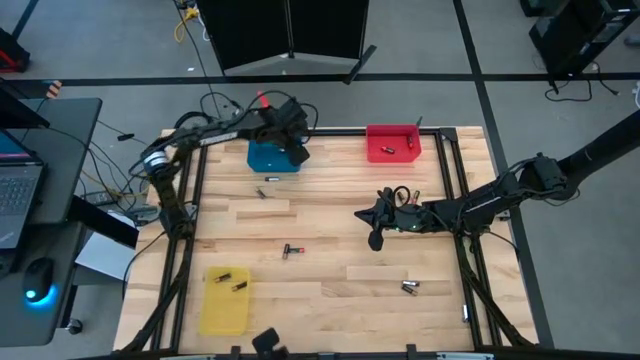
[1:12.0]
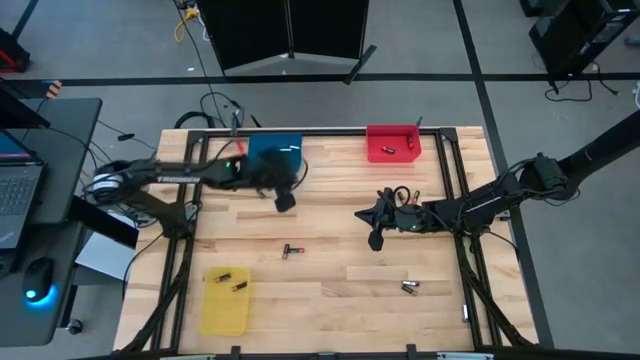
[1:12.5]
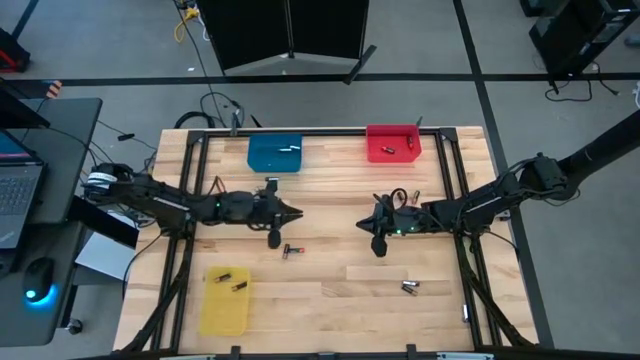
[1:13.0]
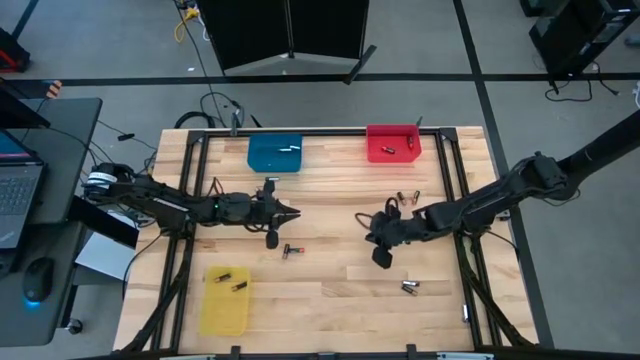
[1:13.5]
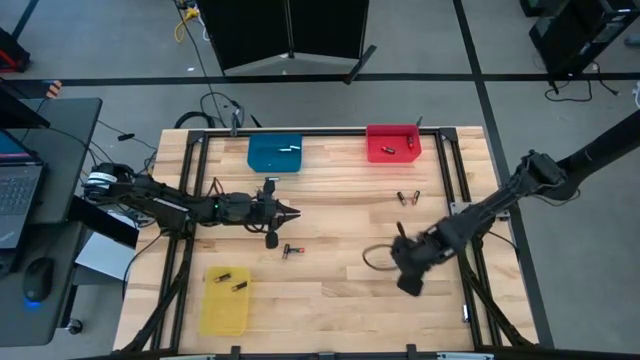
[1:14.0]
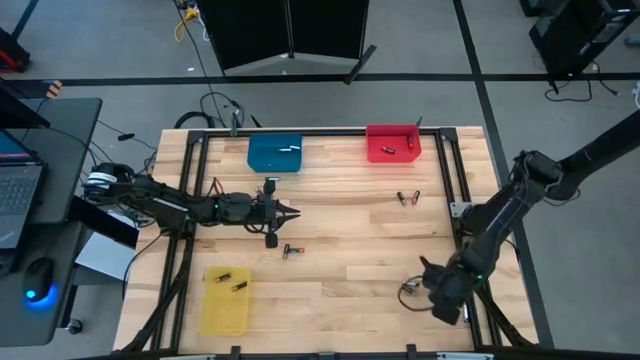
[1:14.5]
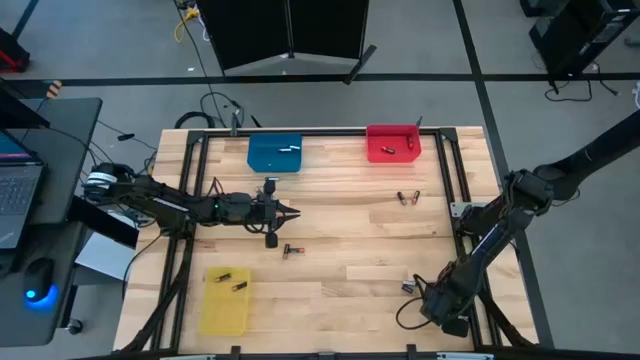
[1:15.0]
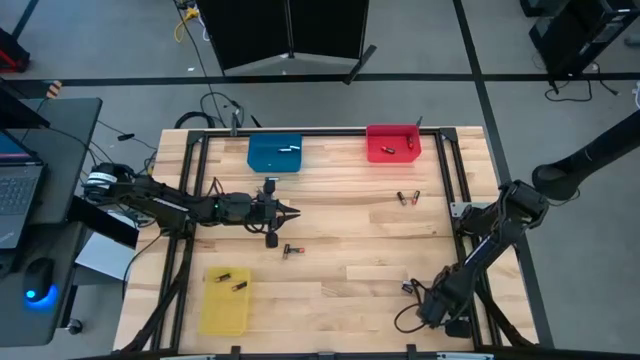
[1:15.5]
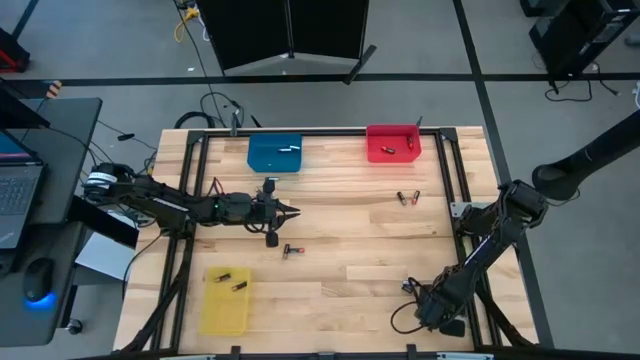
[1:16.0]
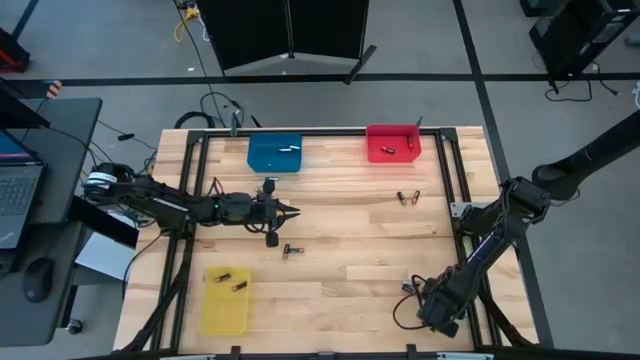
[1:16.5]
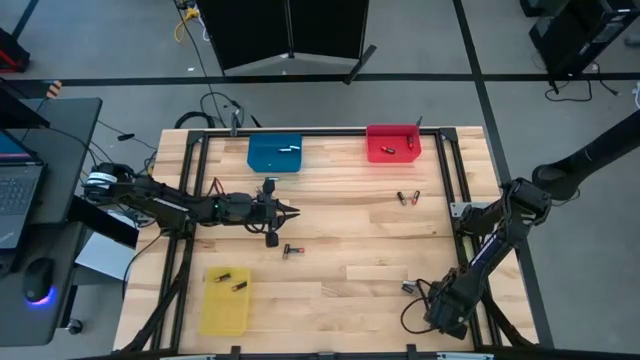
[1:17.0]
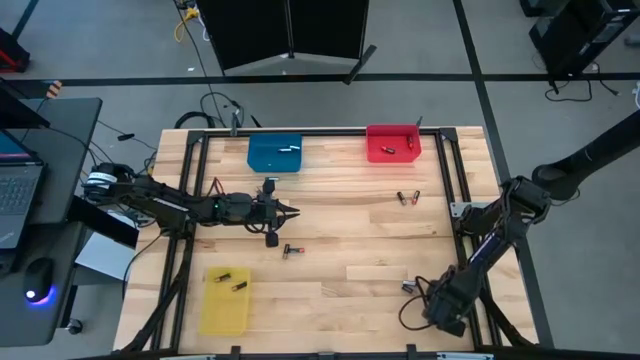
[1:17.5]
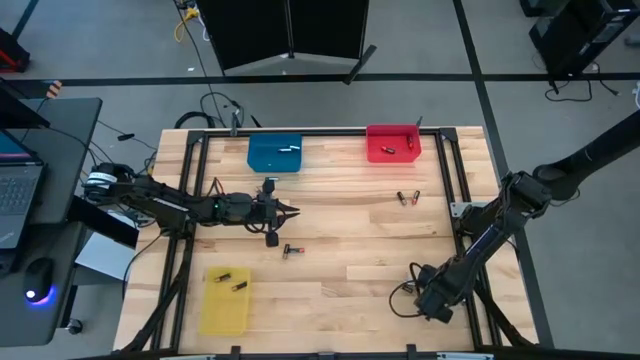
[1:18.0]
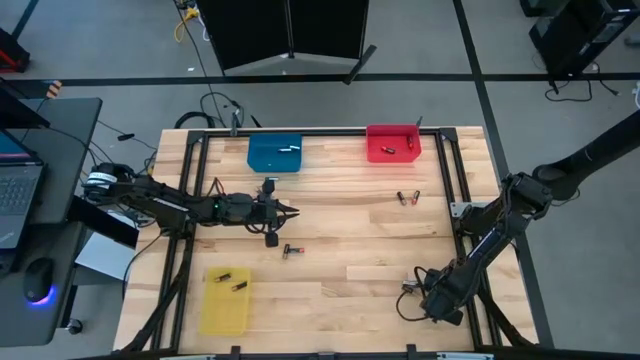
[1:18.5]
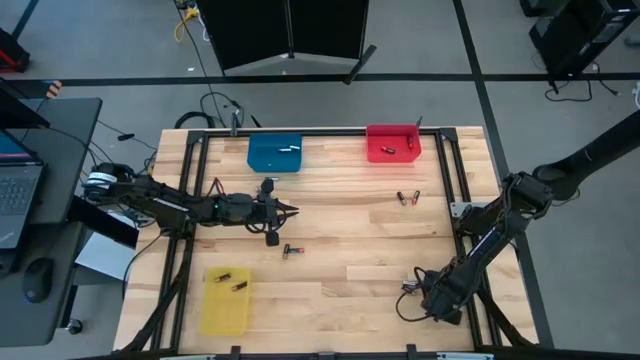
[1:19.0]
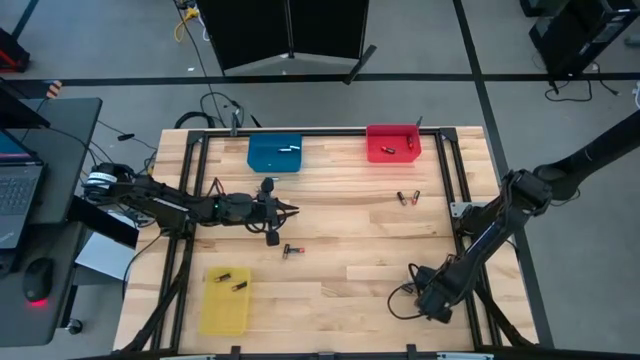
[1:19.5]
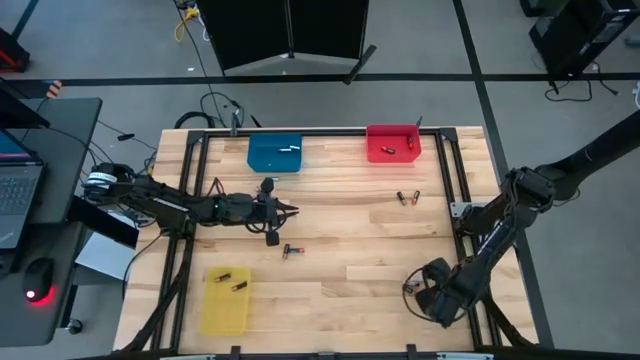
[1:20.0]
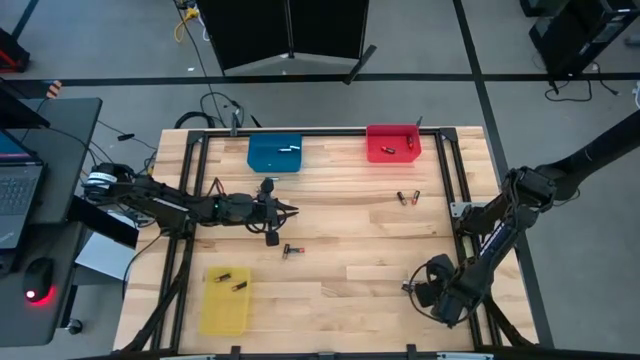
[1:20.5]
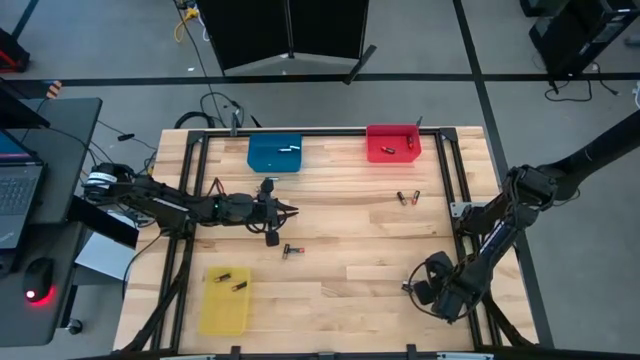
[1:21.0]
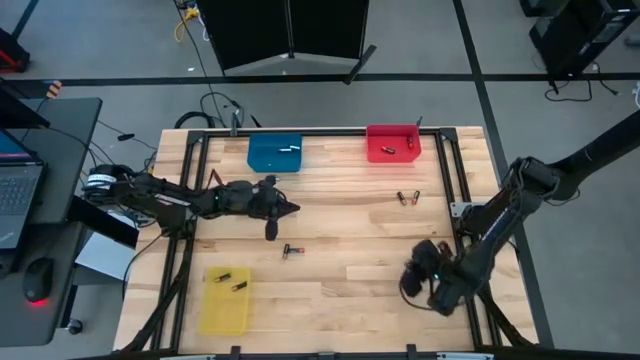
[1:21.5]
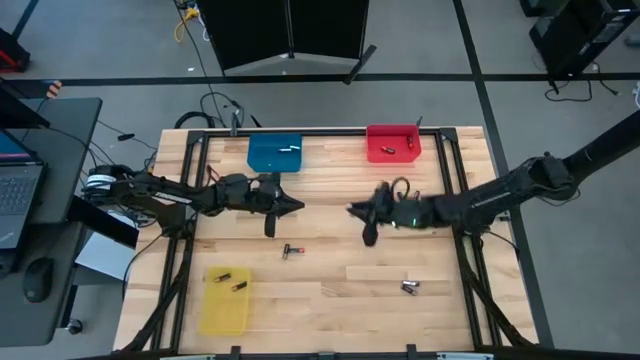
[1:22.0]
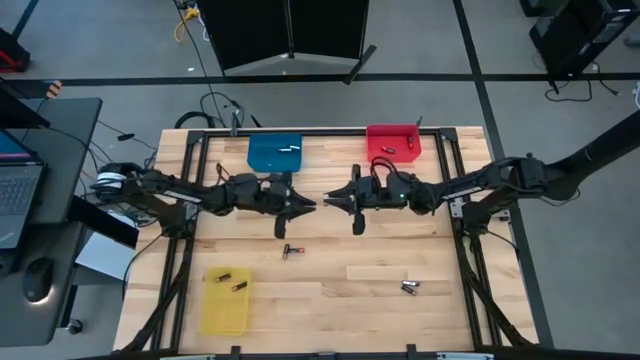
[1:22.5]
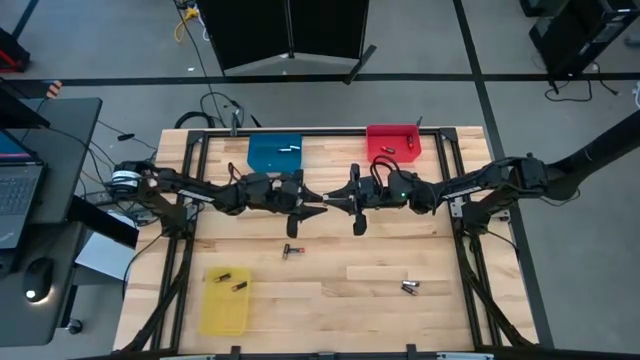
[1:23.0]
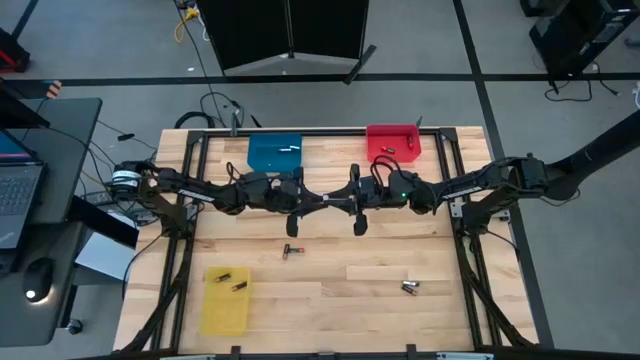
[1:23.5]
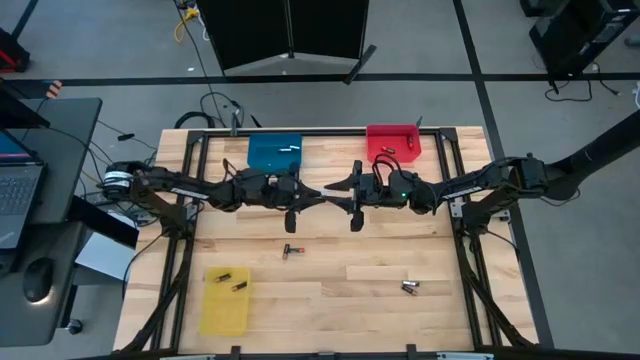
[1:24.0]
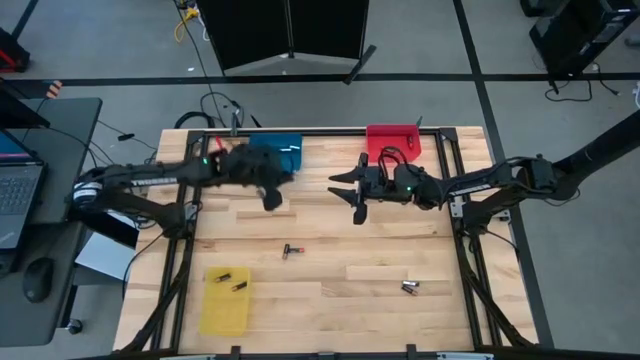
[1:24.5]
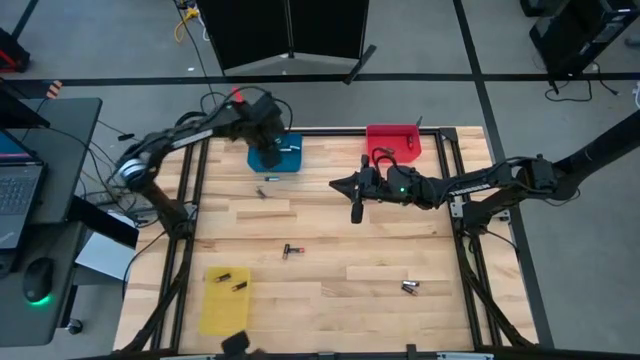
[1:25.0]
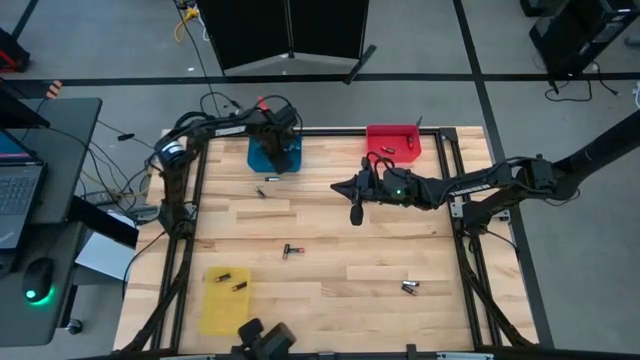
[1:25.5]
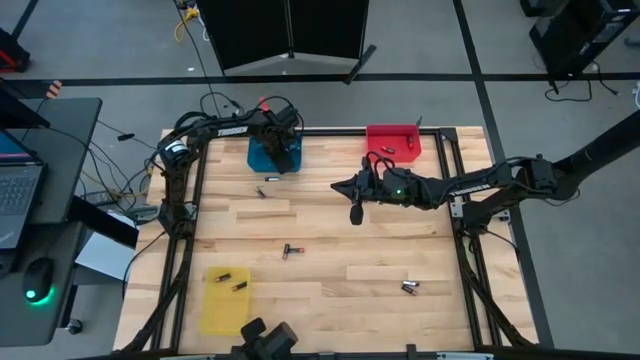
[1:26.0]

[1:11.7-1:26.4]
Task: Sort batteries
Put the silver battery into the blue bin

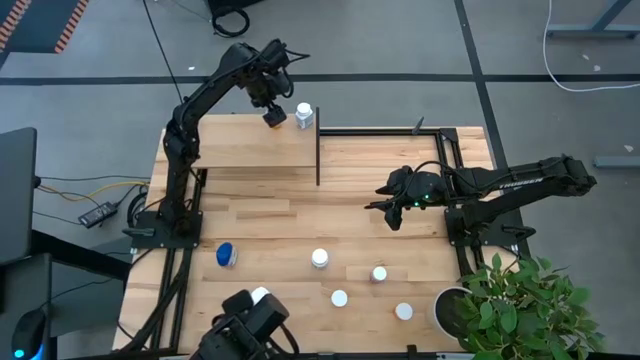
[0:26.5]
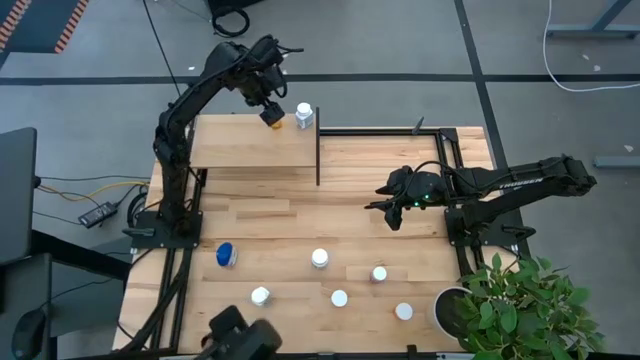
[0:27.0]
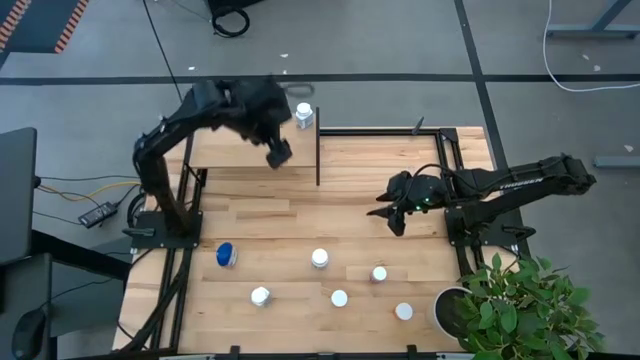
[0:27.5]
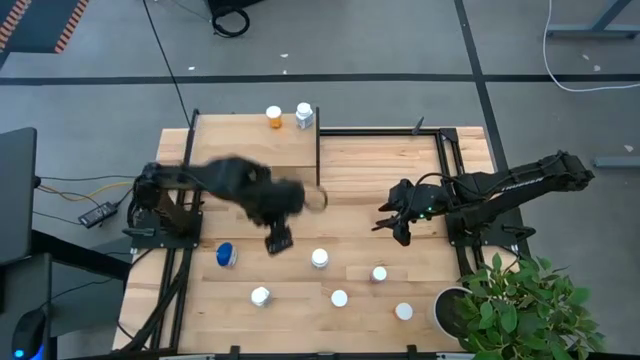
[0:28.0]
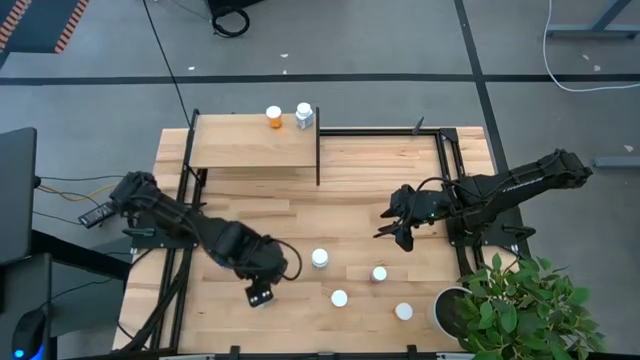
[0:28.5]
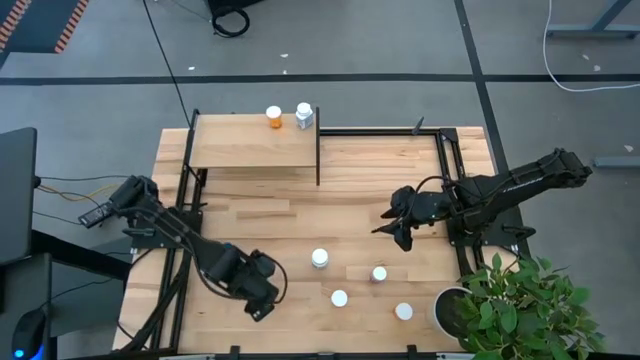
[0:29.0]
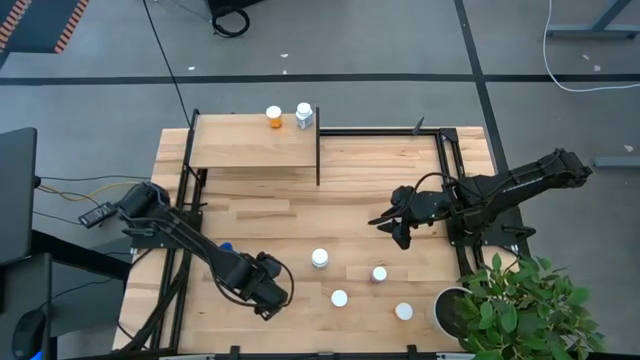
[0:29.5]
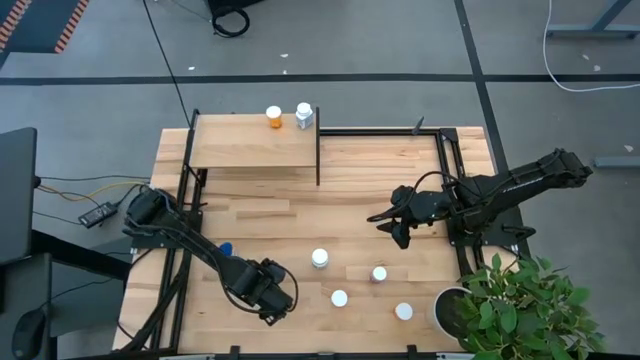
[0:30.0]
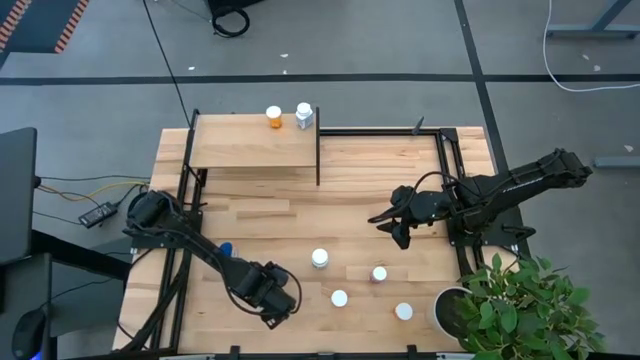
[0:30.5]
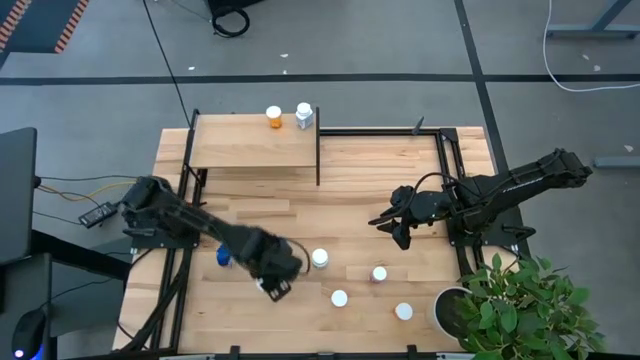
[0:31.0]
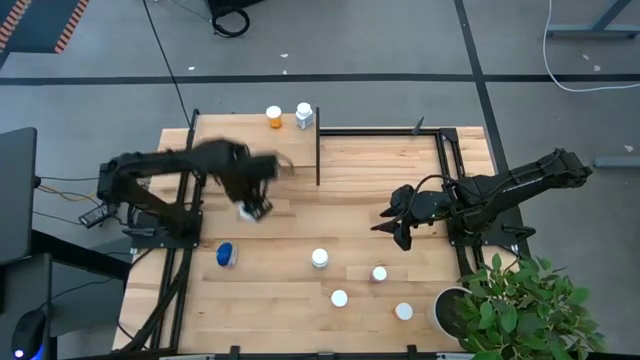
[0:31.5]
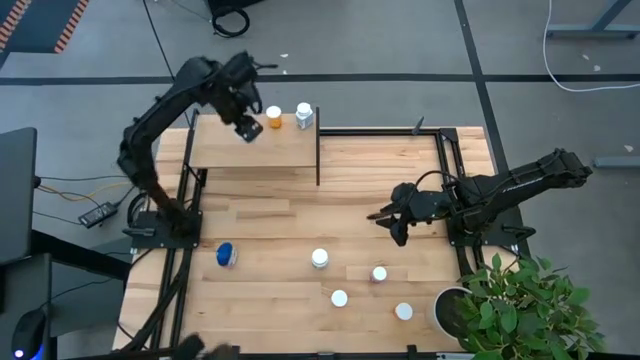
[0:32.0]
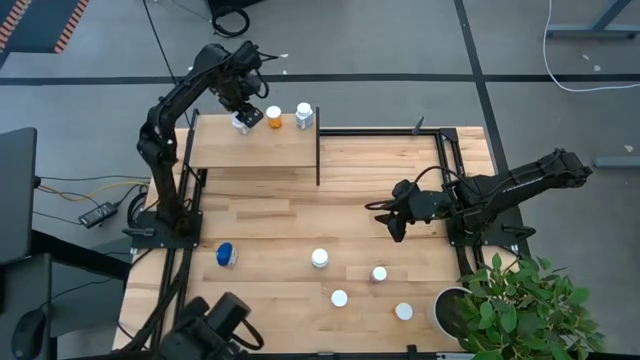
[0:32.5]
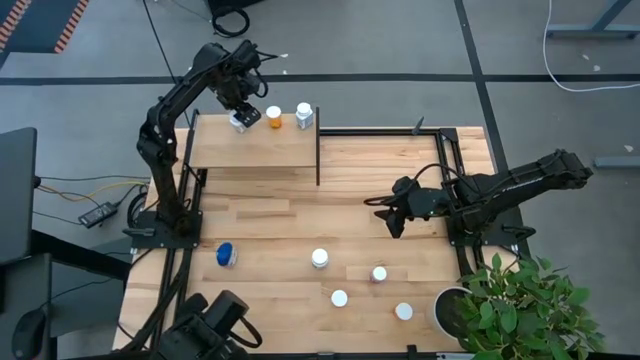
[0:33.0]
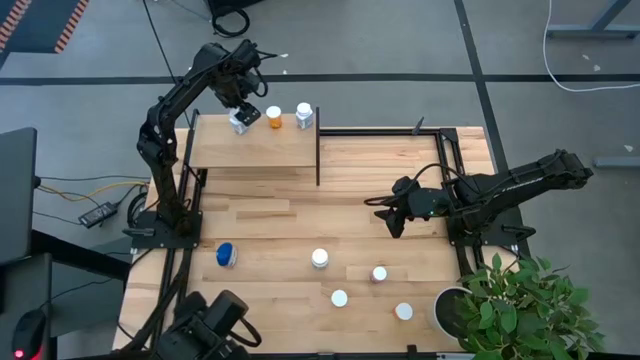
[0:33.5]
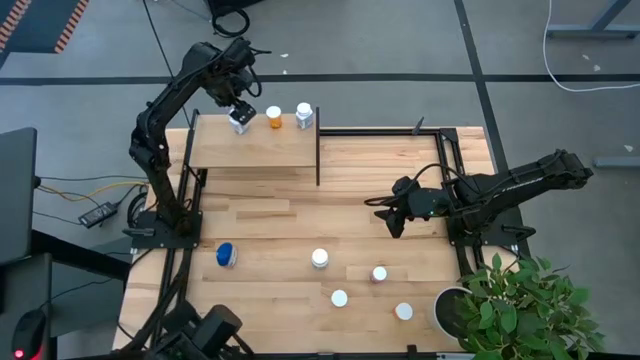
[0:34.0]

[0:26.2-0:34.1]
Task: Pick and place medicine bottles onto shelf by color
Put the white pill bottle on the shelf
